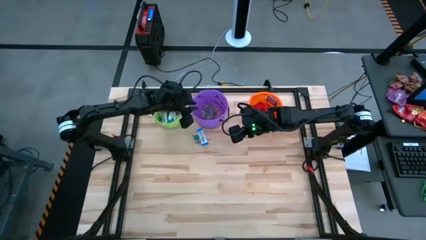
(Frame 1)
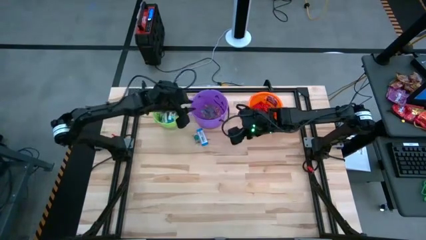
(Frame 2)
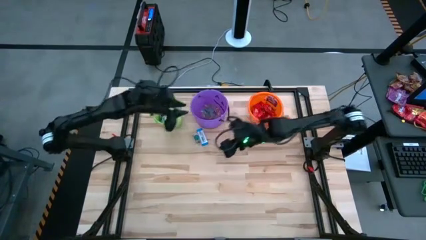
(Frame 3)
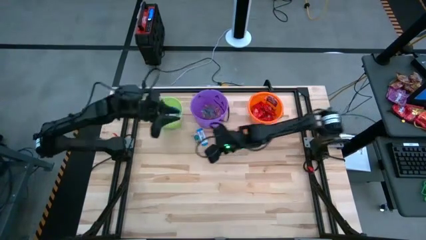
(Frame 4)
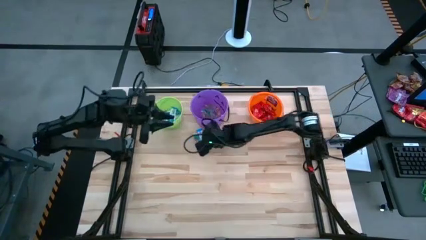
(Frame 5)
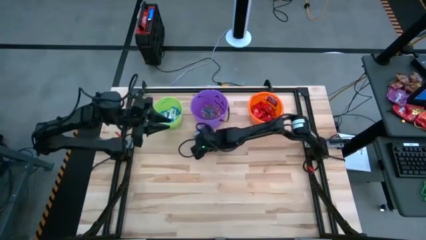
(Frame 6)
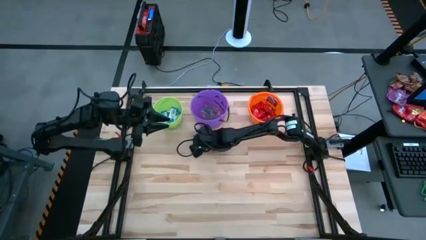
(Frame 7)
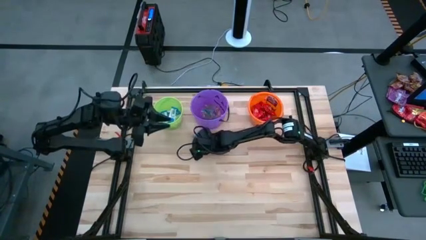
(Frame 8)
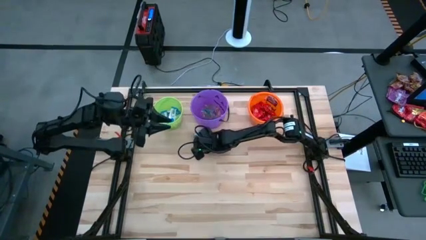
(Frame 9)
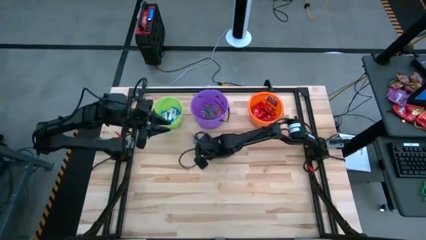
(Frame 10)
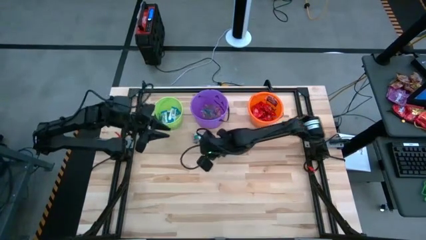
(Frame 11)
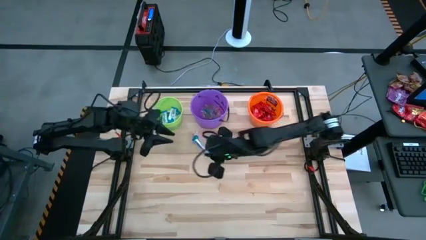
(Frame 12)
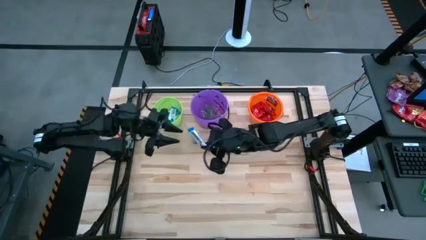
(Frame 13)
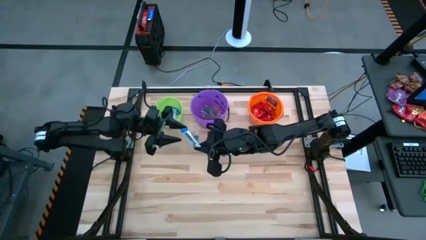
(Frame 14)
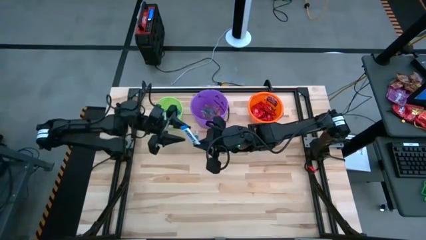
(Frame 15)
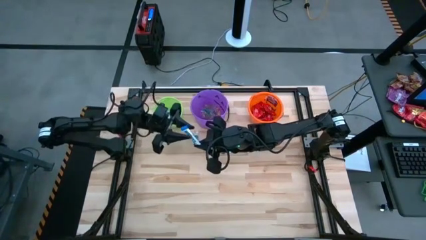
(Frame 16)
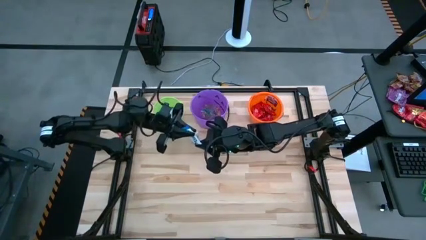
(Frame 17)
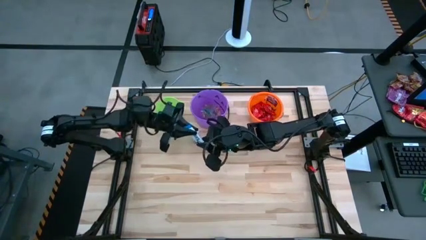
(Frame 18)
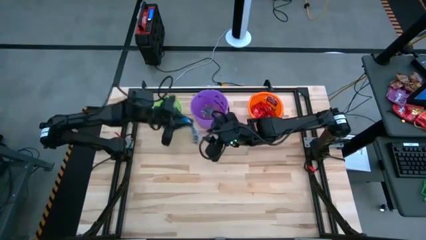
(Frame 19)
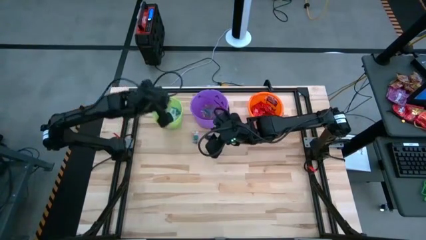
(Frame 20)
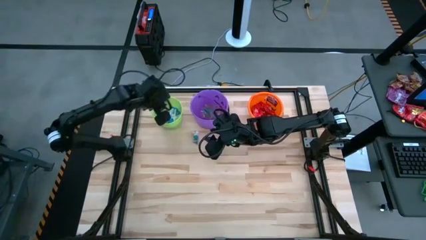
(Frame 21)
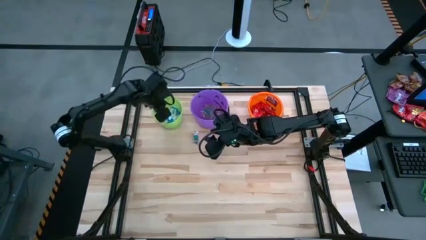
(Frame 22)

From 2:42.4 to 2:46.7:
Task: Sort candy by brand, put in halloween buckets
Put the white chocolate into the green bucket

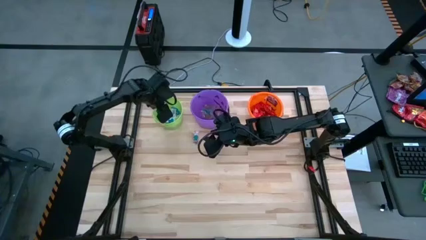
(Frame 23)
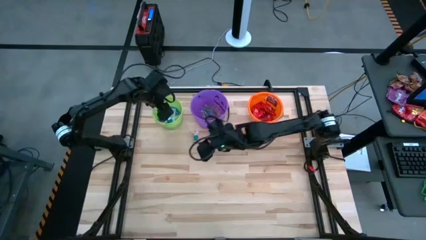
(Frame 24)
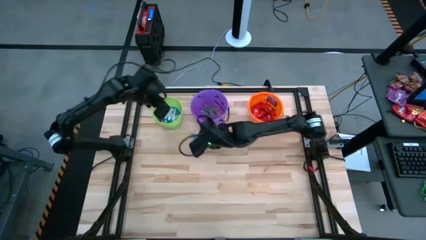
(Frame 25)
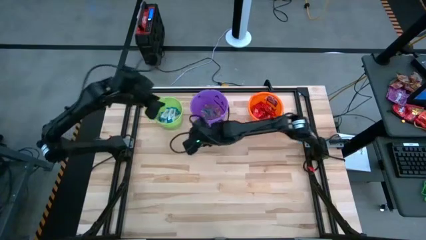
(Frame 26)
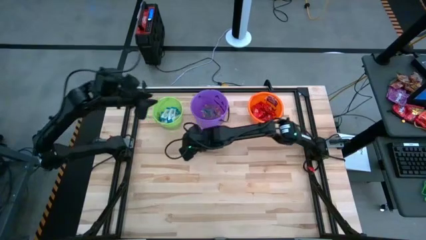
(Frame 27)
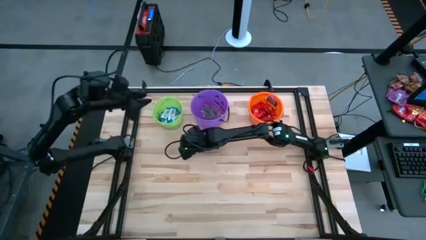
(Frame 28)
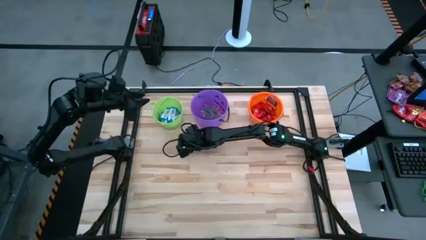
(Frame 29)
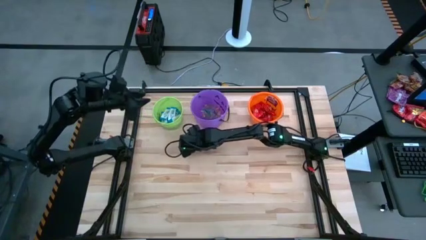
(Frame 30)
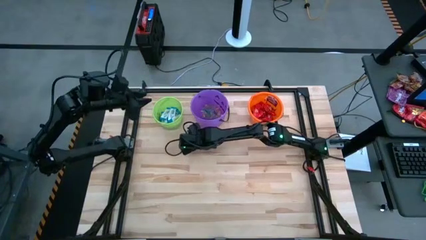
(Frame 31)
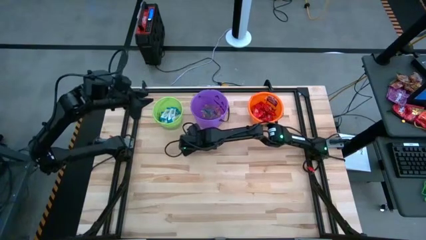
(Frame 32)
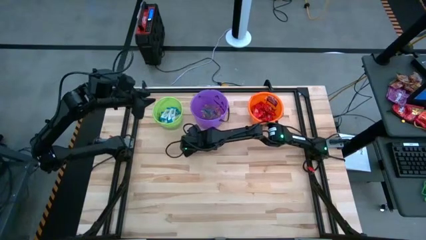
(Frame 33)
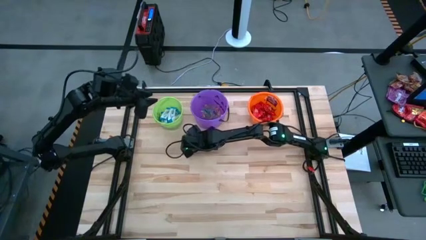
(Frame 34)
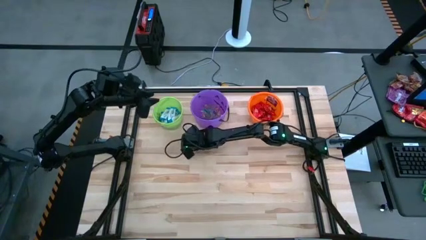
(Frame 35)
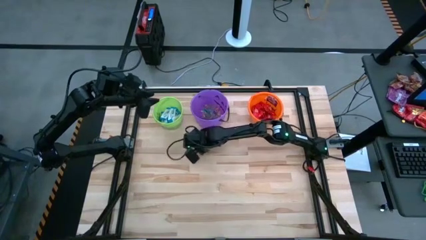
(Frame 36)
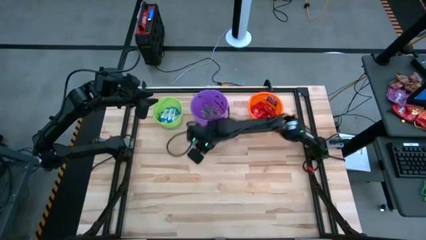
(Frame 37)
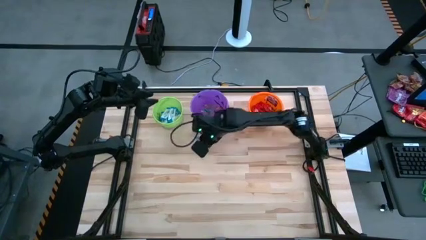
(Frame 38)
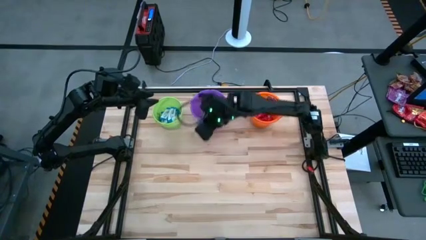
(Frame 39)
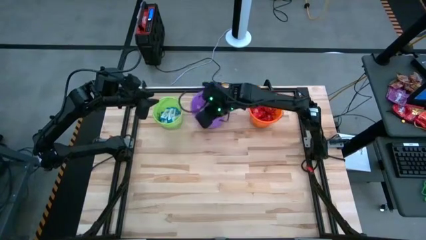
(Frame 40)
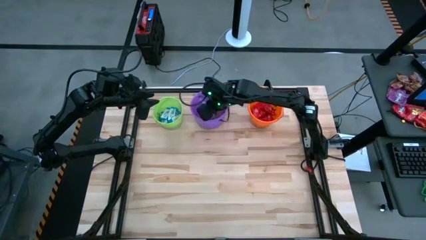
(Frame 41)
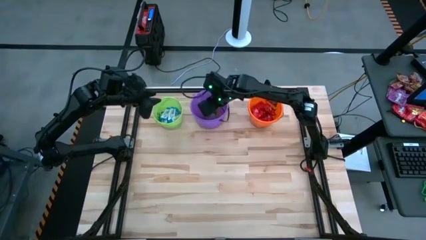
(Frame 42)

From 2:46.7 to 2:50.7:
Put the blue gummy into the purple bucket

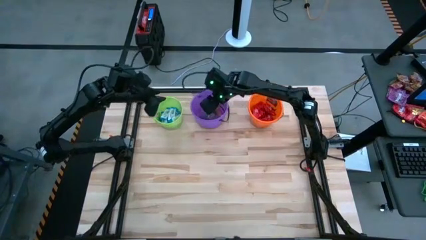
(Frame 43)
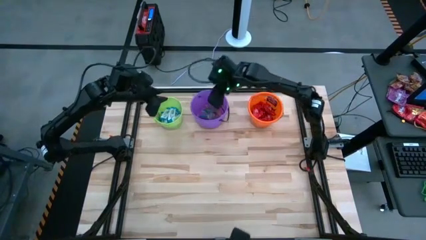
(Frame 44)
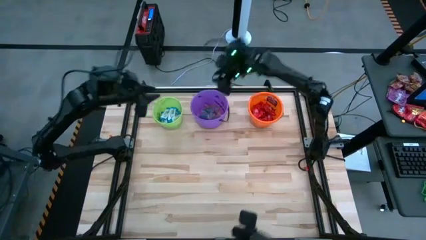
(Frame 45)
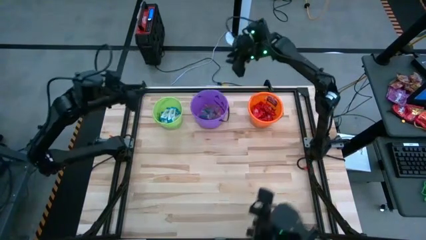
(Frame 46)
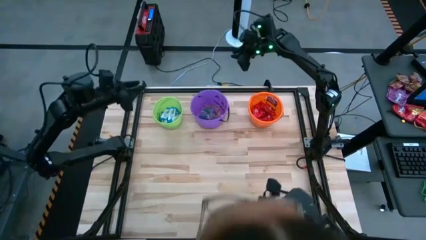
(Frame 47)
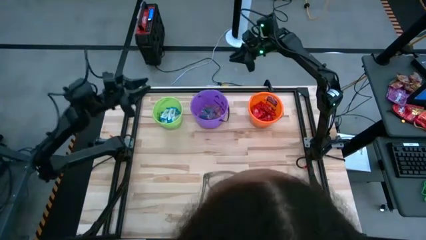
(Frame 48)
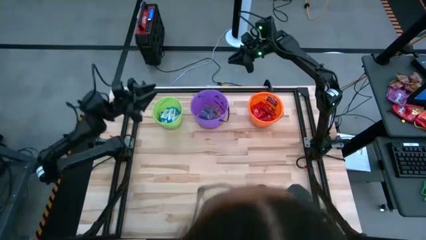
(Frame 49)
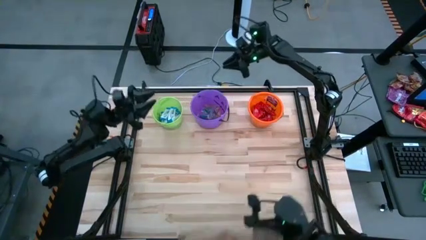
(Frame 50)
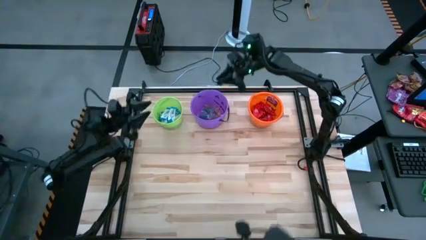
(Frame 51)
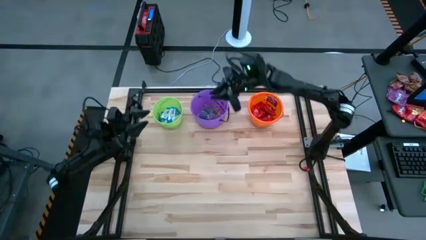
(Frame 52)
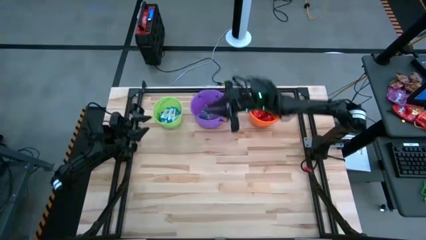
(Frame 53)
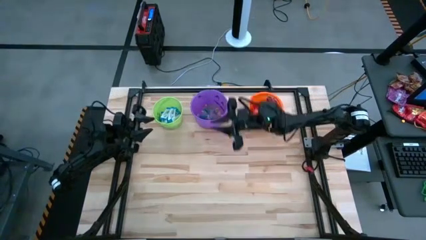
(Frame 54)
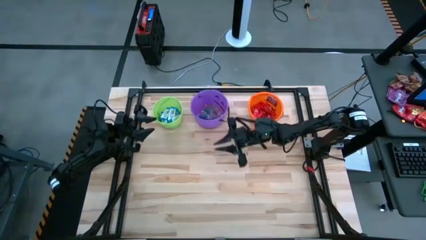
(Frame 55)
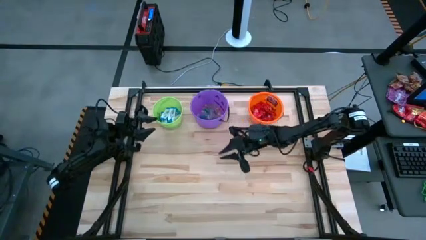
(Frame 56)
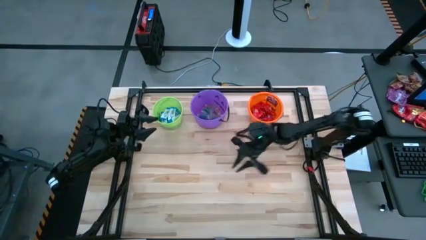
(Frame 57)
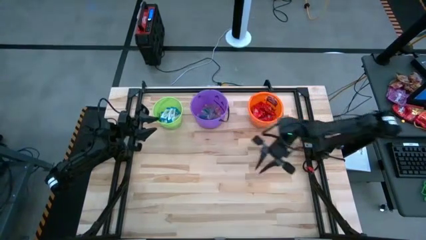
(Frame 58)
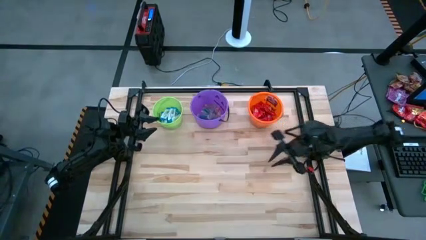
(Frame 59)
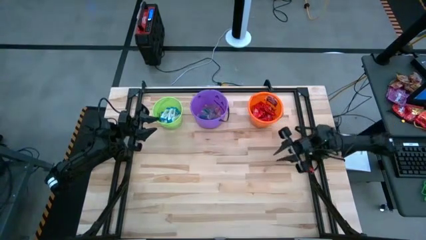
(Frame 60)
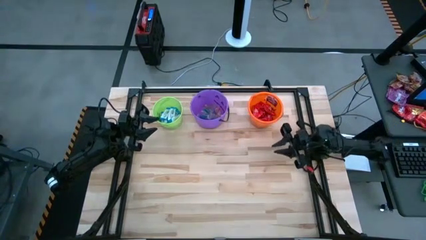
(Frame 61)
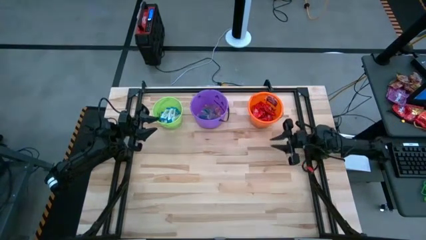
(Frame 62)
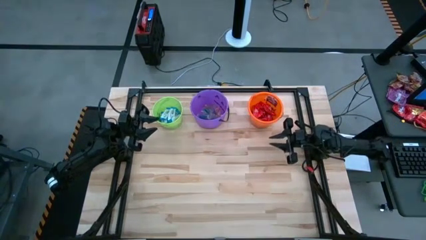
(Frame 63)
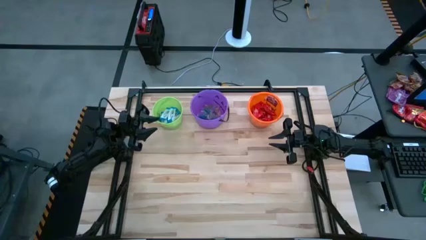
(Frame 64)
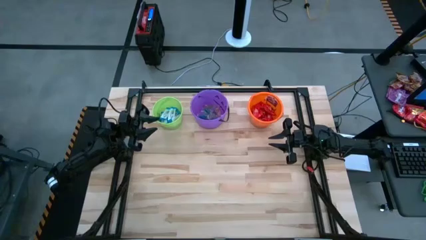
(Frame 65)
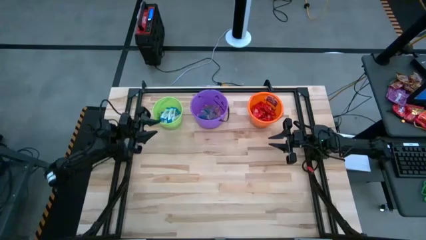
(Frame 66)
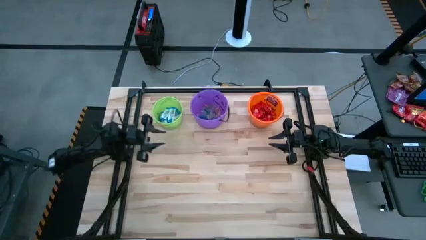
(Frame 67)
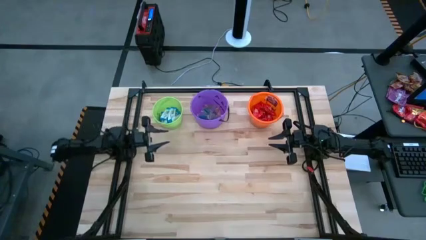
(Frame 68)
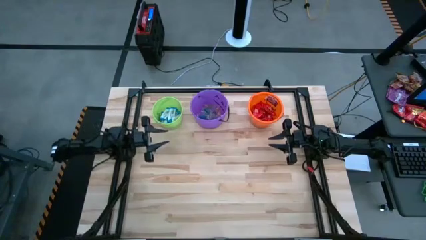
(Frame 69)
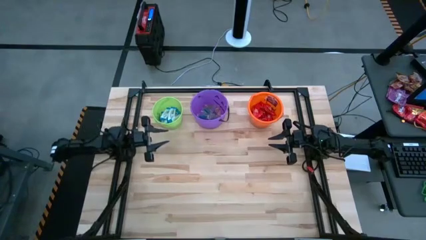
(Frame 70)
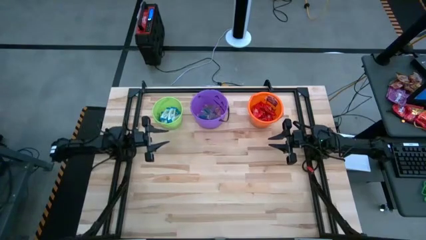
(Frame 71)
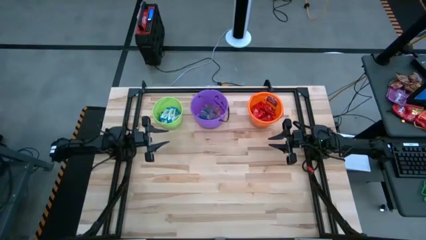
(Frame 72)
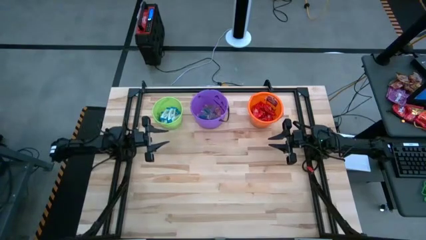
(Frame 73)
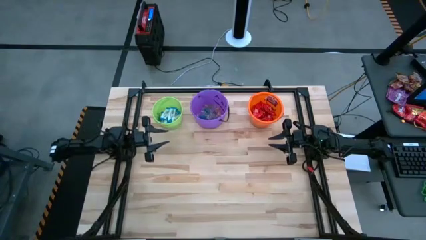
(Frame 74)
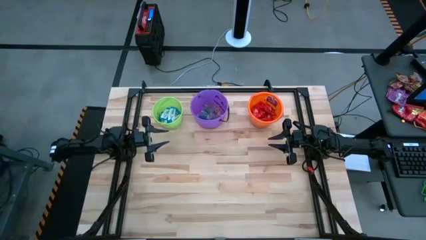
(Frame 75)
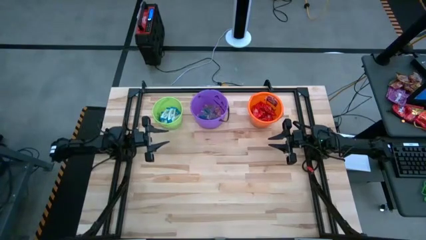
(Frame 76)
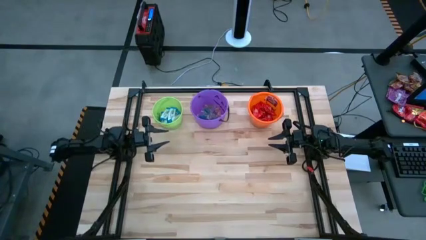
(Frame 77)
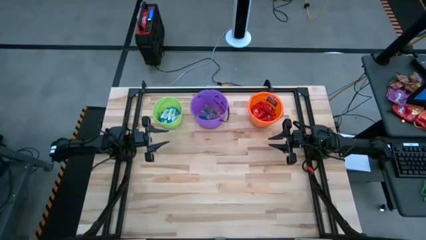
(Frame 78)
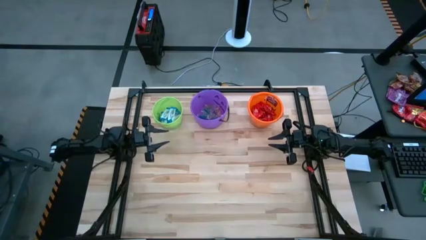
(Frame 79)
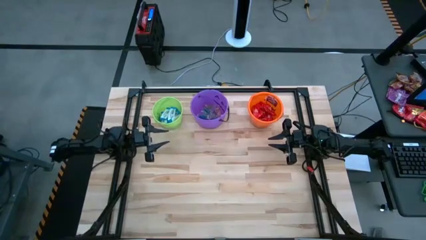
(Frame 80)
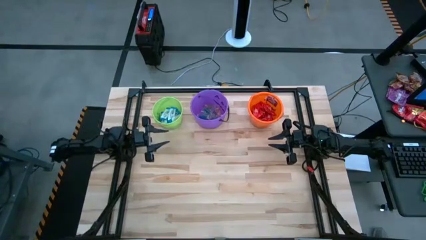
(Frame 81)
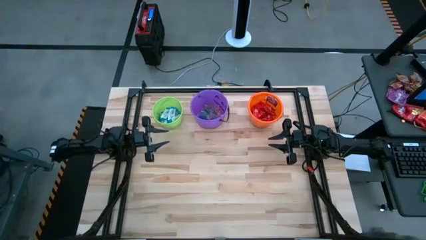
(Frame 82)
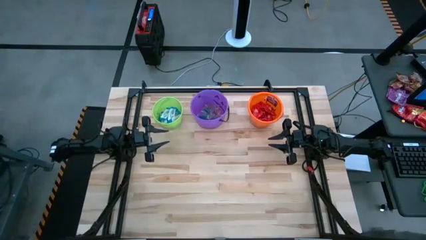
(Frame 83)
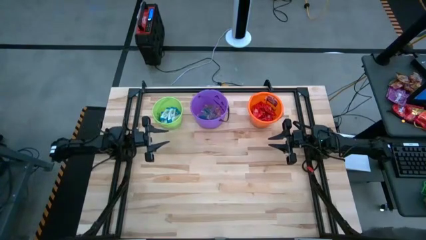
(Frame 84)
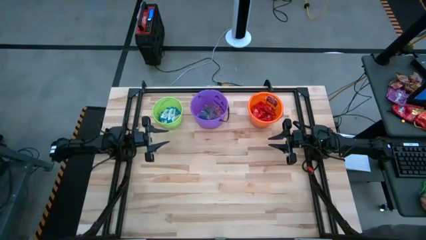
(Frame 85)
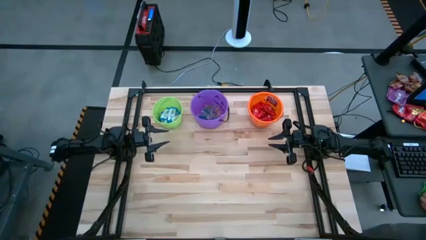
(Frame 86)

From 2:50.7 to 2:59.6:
Return to Home Position
